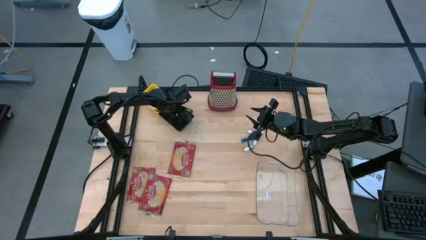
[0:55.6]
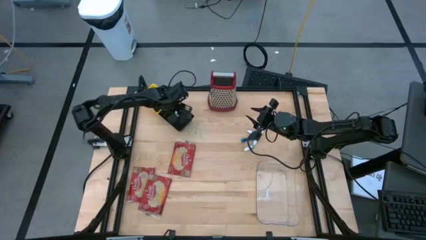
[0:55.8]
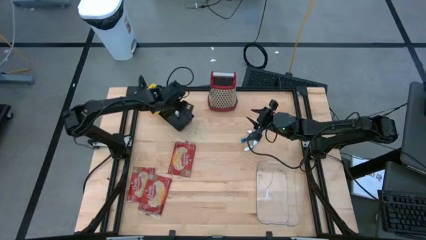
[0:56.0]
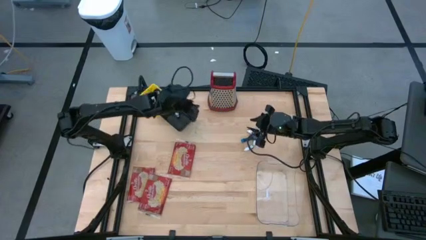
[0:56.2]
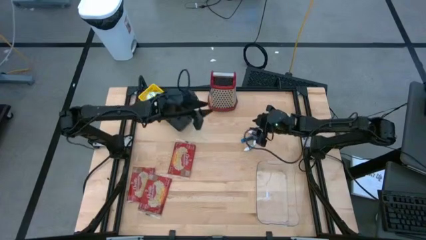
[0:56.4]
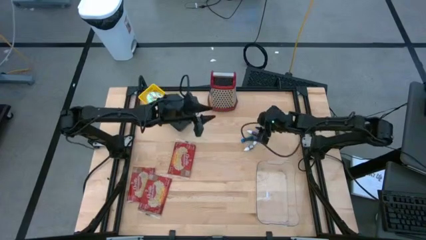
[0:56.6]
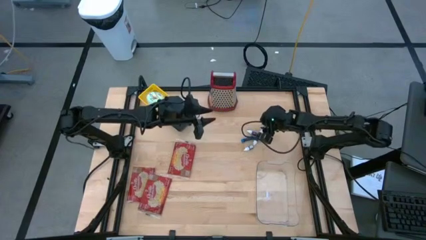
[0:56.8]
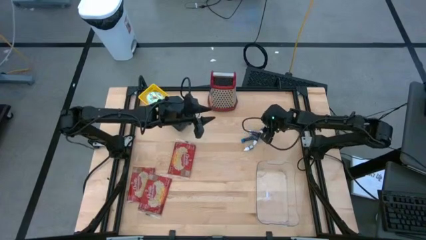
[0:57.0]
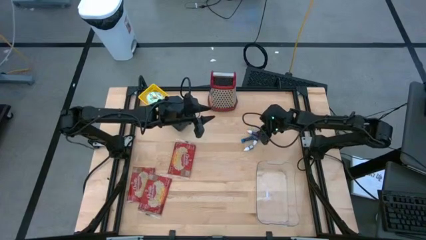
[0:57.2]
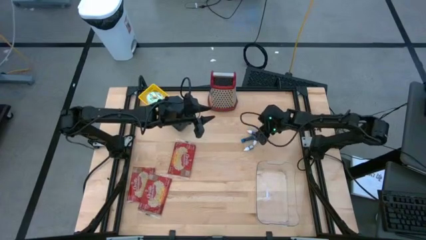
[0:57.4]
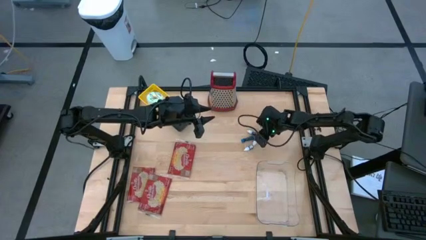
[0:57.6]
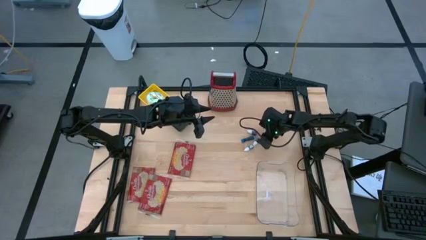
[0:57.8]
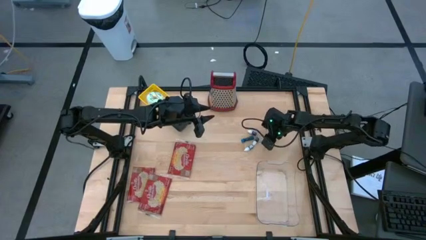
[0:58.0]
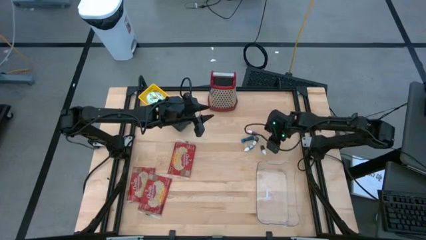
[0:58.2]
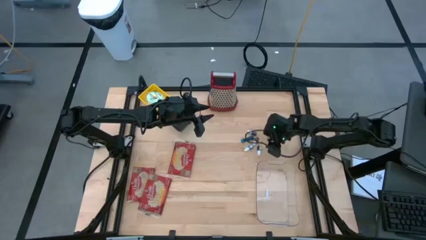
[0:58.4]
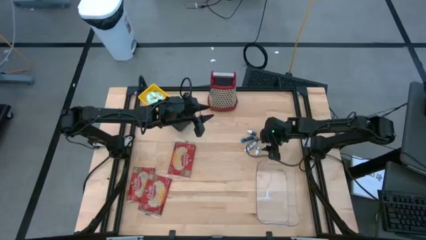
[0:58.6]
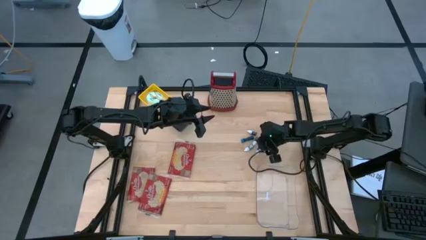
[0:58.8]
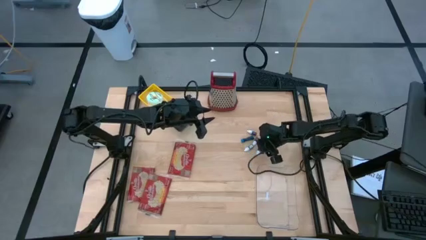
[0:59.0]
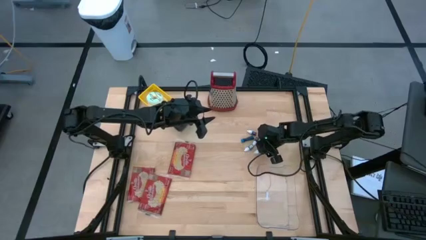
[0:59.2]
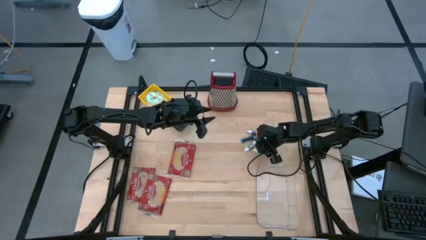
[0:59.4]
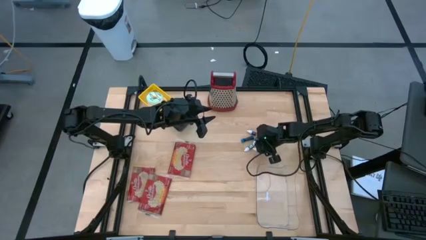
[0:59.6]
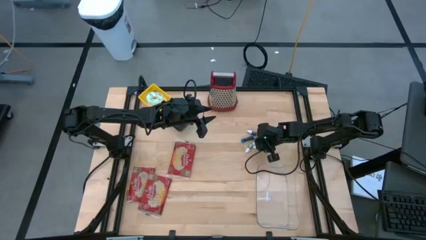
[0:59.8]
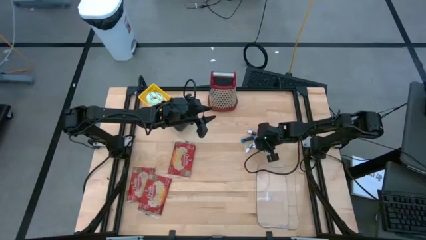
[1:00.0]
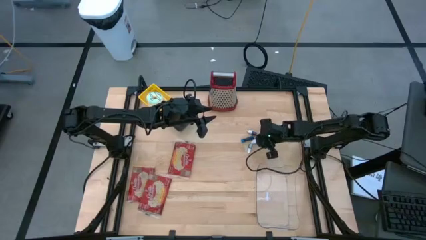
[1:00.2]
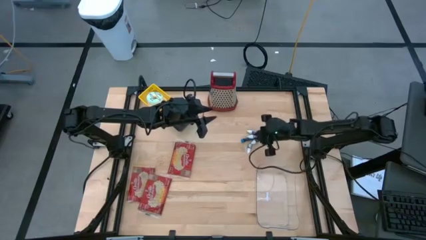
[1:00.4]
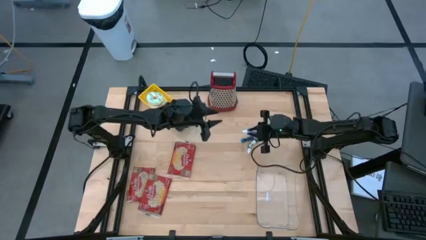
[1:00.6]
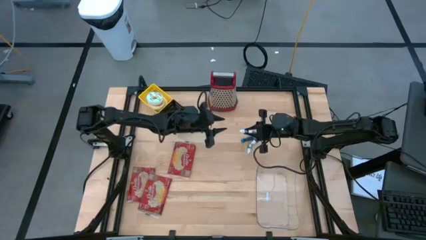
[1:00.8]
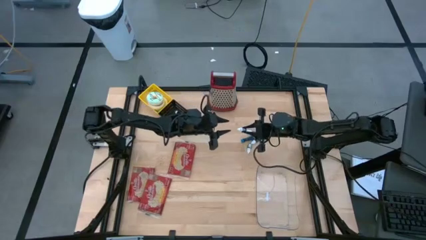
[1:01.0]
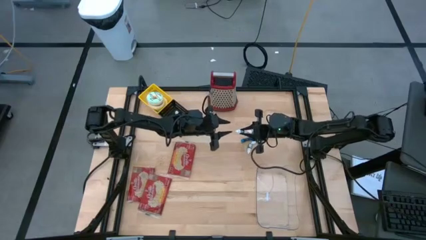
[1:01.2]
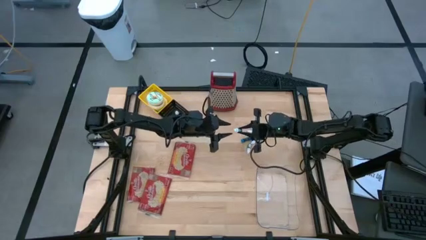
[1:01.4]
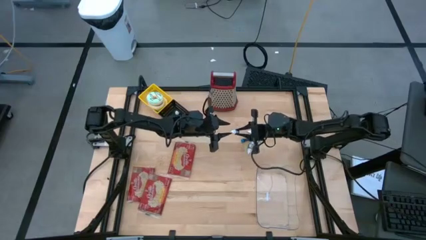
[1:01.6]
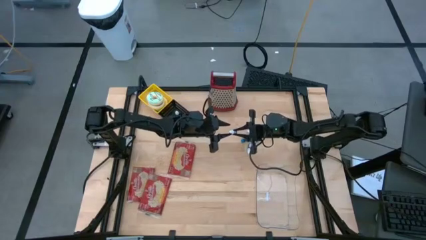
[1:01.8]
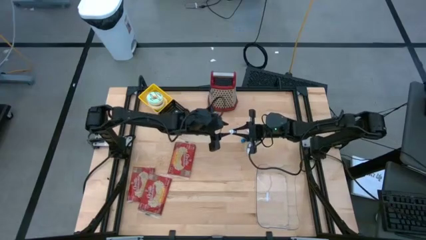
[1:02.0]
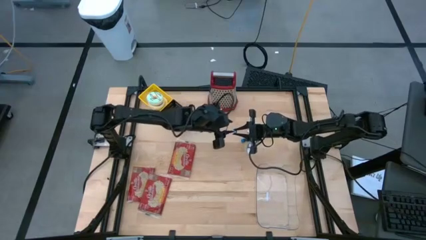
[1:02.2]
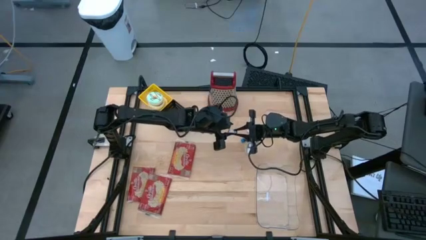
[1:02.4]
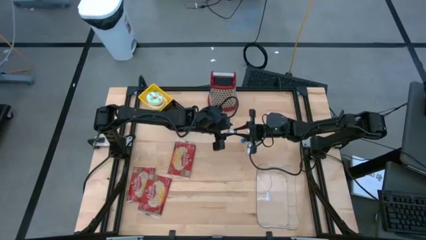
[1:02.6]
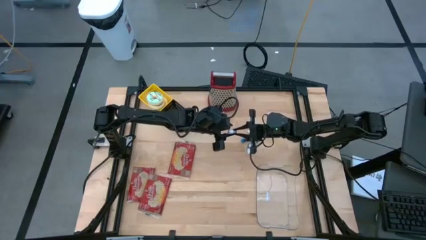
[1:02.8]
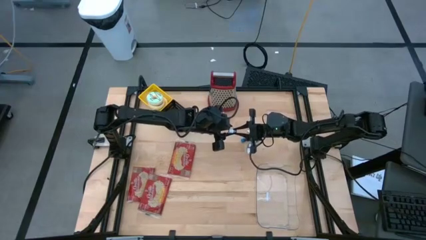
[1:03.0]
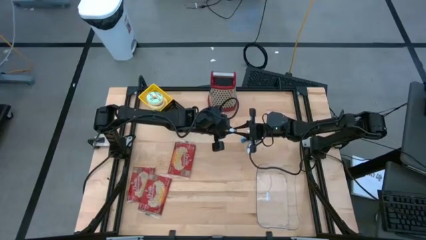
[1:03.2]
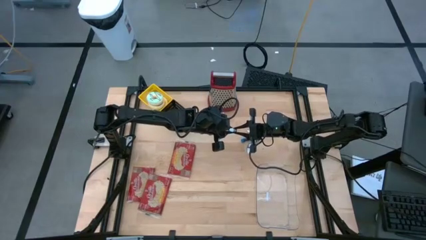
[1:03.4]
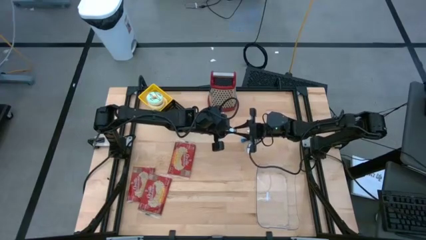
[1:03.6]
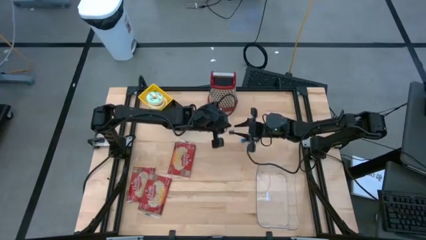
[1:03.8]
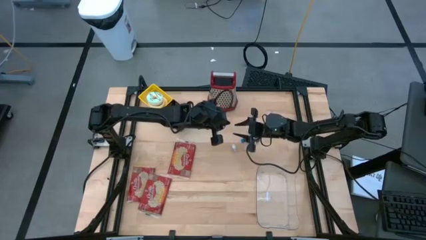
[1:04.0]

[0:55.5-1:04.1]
Put the top green food coloring bottle into the black bin

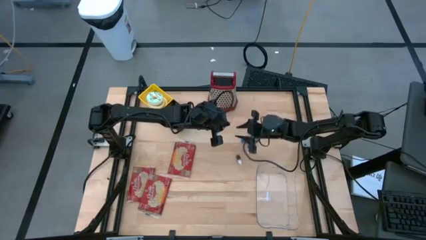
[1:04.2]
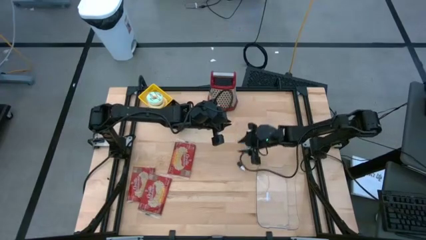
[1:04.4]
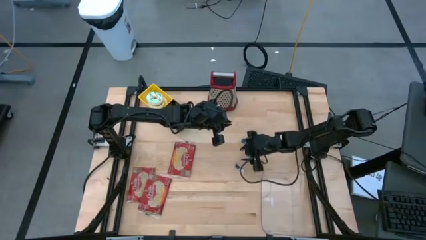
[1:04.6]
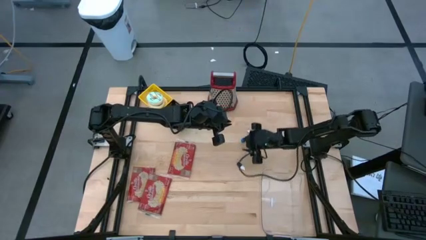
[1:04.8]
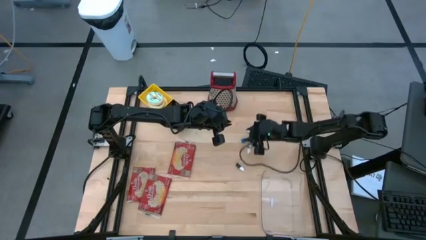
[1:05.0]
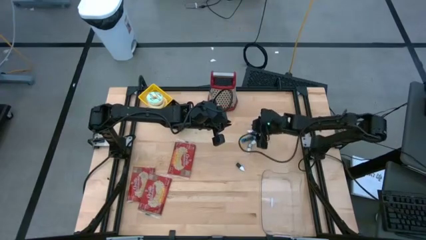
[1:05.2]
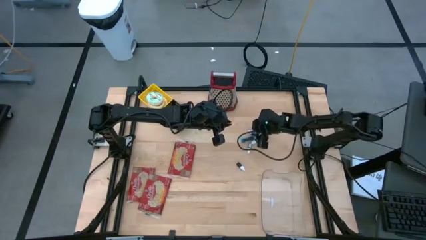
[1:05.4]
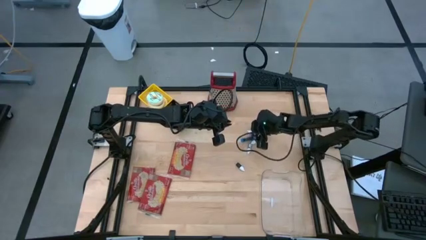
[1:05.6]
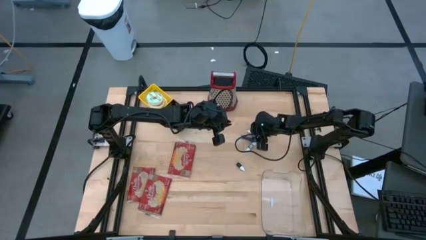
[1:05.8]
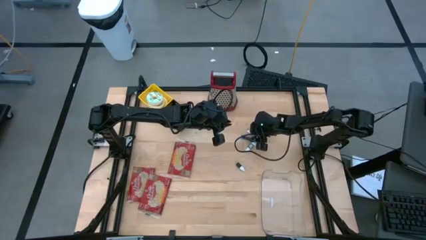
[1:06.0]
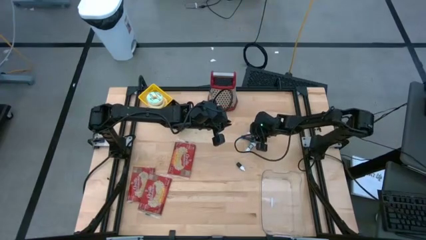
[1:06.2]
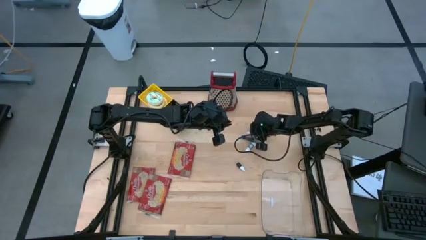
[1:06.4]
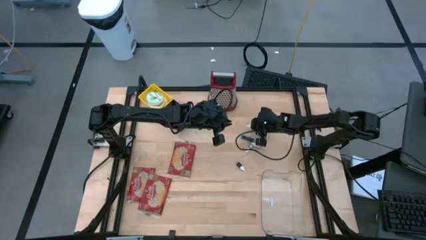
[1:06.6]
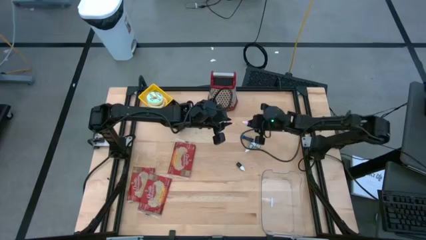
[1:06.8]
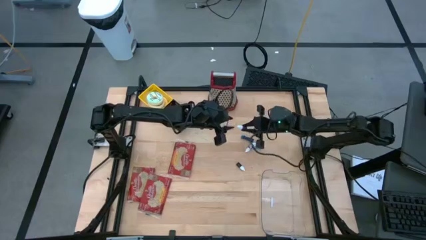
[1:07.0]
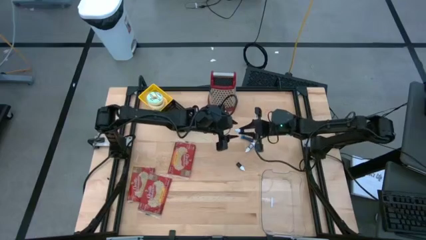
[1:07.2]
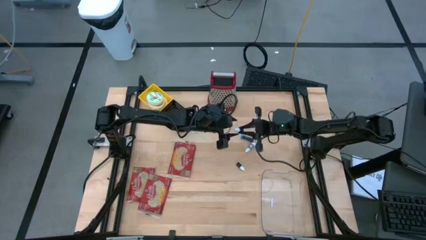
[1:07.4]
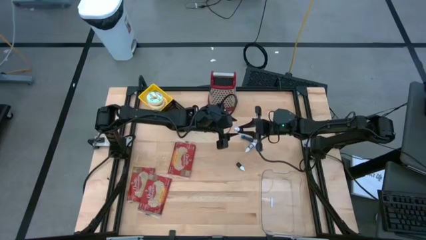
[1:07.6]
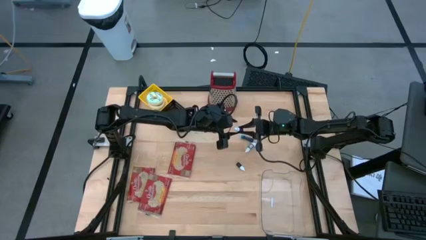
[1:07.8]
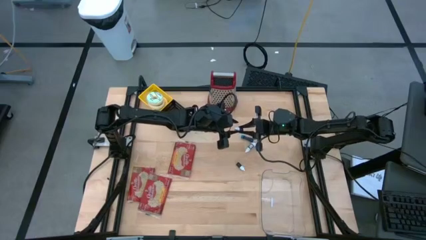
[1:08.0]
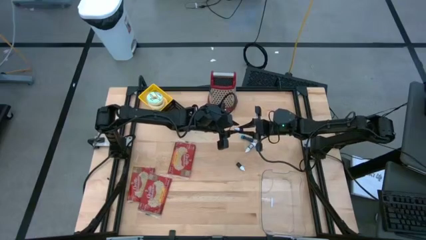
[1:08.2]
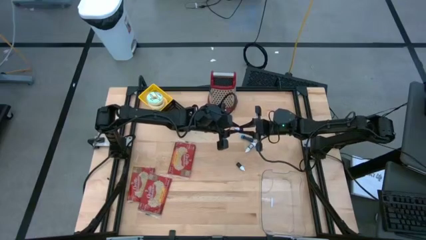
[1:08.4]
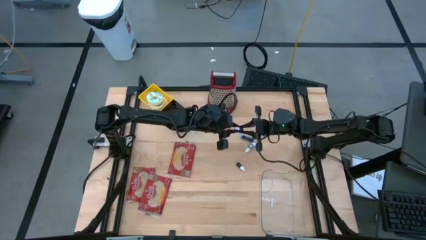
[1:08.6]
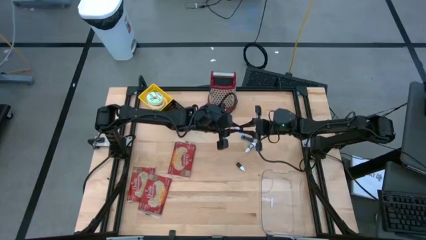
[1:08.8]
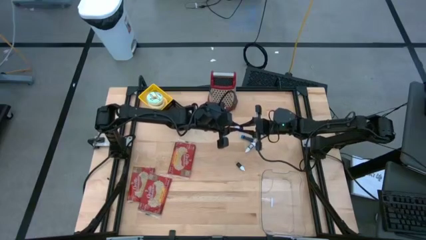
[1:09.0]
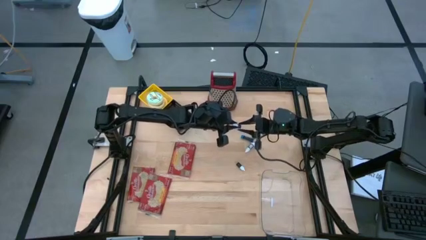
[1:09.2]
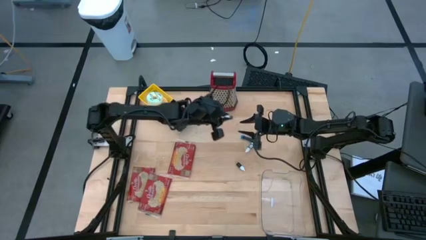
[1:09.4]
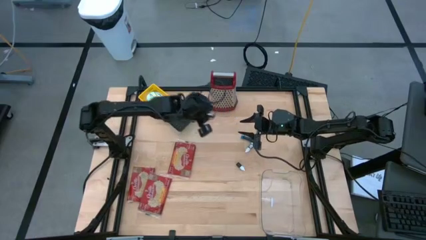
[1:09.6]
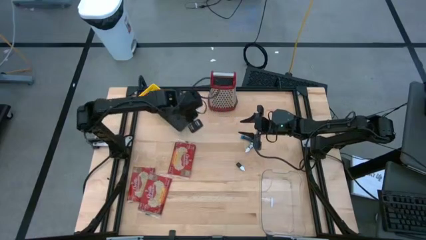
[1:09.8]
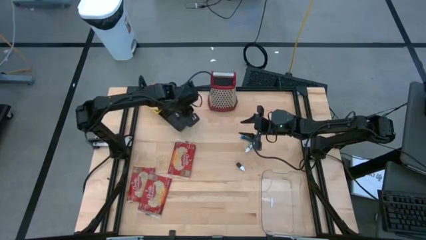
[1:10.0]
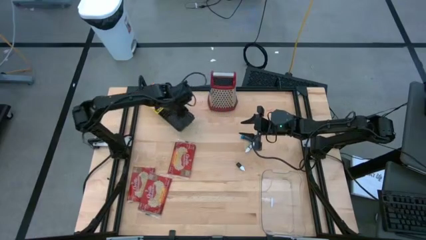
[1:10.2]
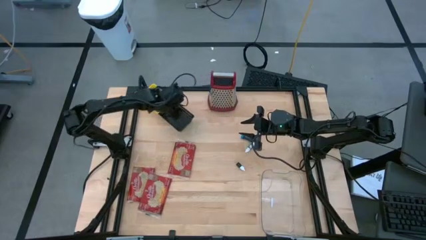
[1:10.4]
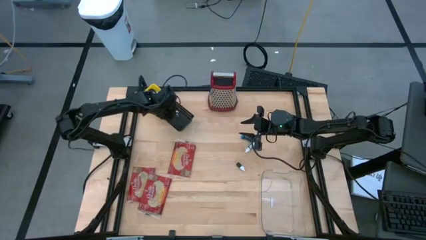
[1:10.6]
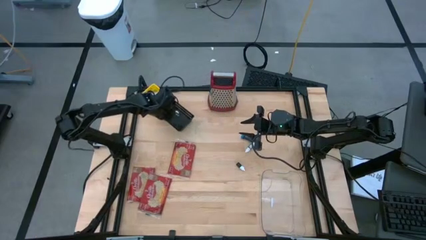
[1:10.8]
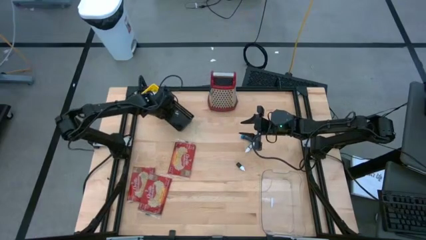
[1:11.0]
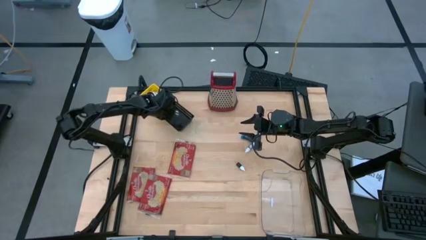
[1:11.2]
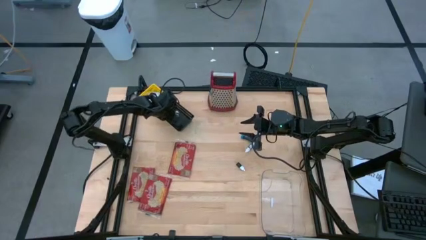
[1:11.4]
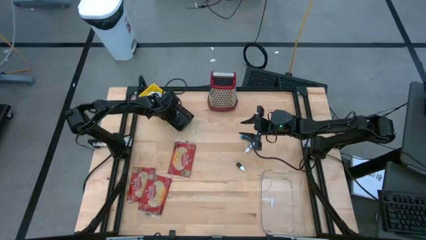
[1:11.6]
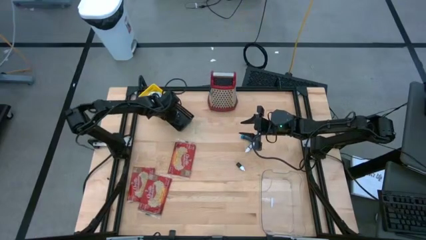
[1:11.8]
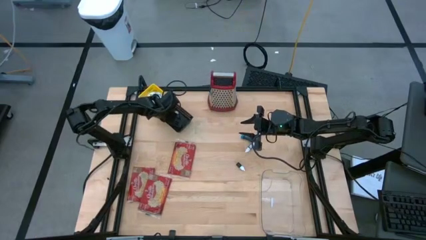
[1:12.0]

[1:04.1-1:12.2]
Put the purple food coloring bottle into the black bin
